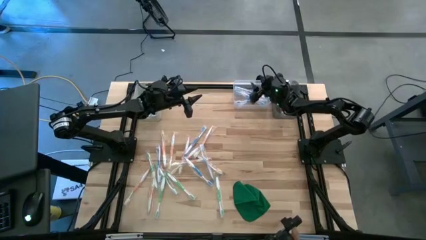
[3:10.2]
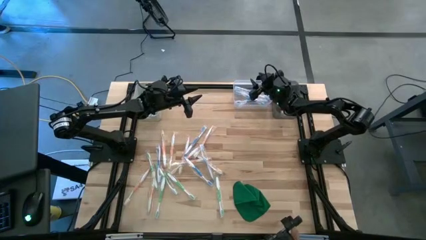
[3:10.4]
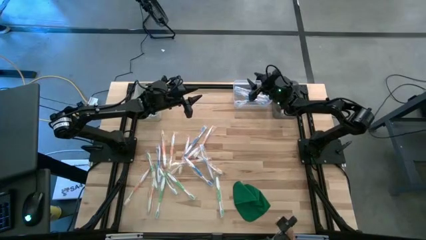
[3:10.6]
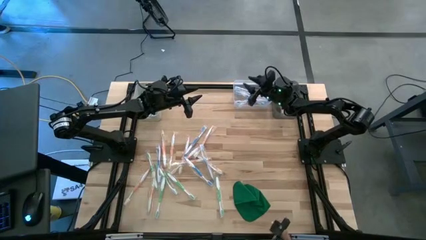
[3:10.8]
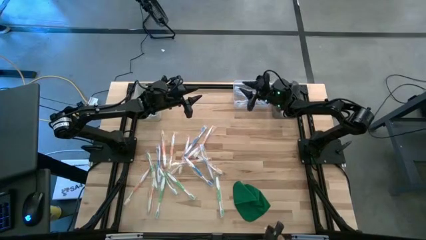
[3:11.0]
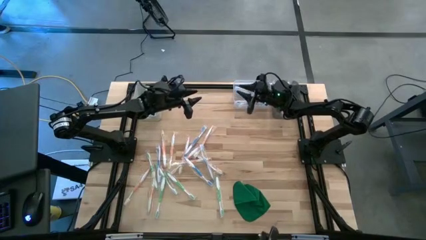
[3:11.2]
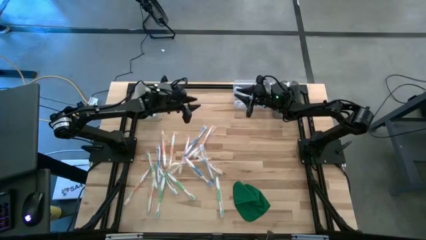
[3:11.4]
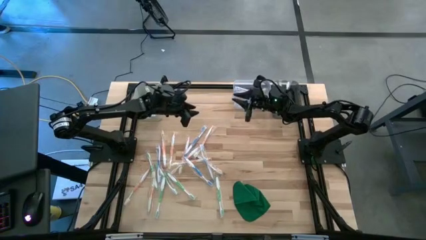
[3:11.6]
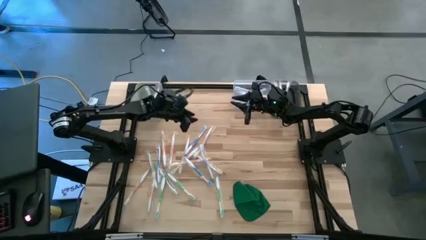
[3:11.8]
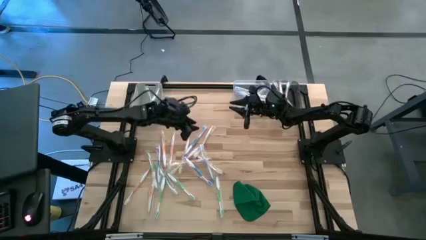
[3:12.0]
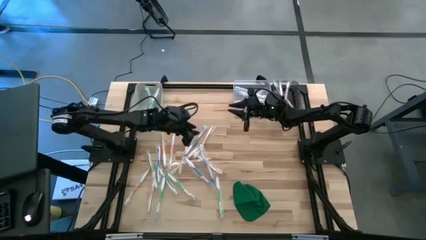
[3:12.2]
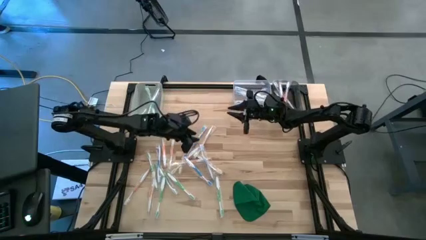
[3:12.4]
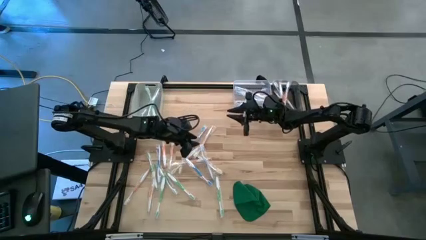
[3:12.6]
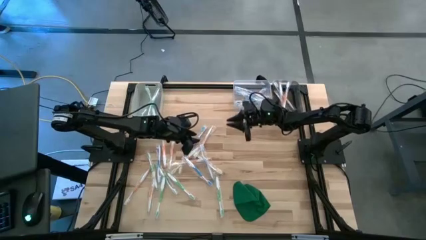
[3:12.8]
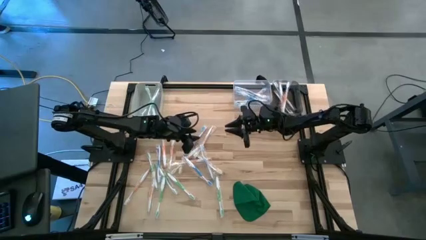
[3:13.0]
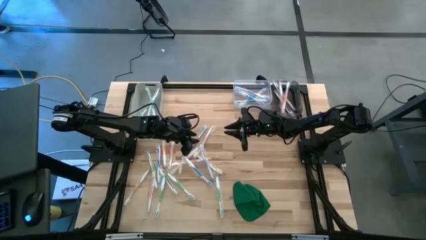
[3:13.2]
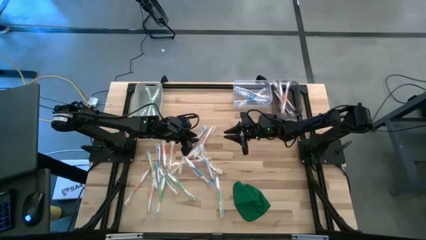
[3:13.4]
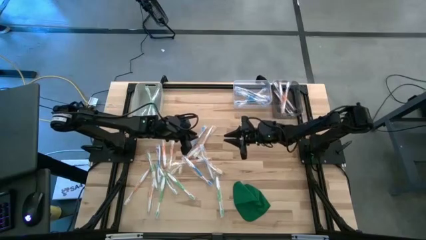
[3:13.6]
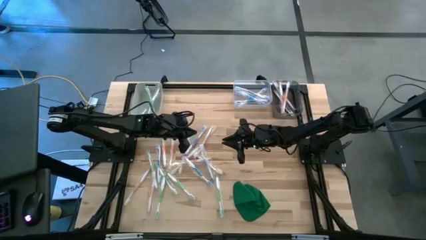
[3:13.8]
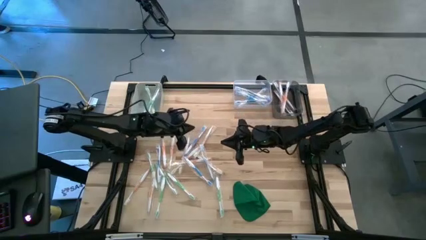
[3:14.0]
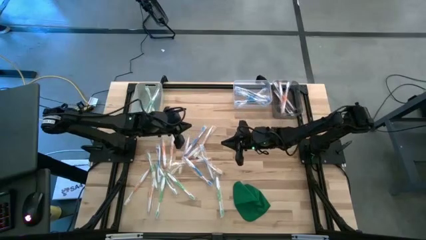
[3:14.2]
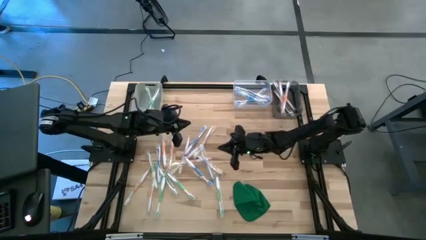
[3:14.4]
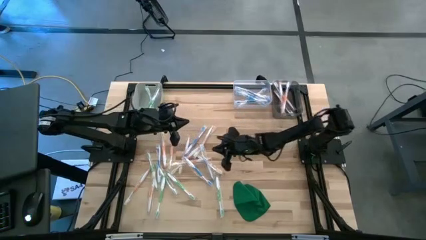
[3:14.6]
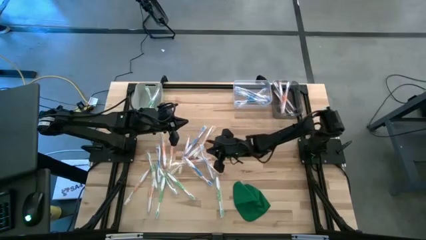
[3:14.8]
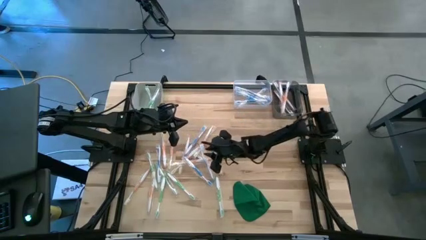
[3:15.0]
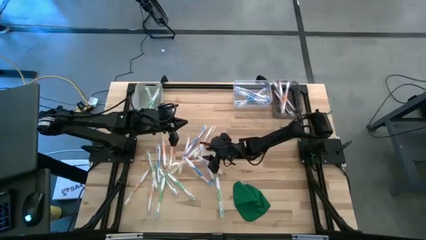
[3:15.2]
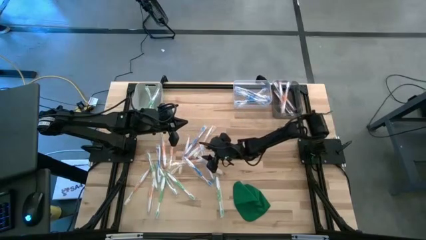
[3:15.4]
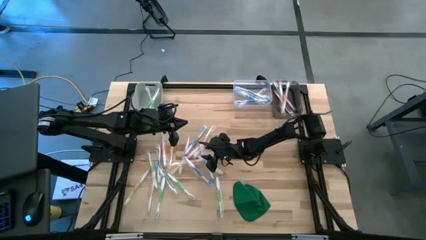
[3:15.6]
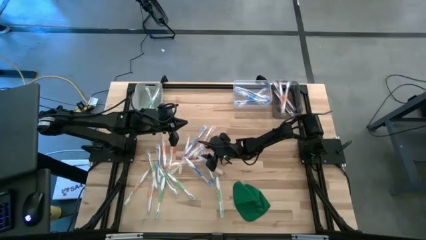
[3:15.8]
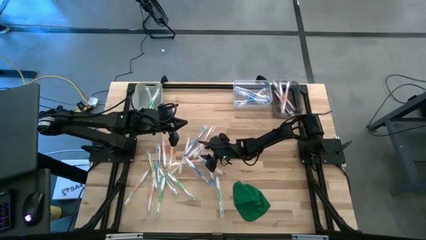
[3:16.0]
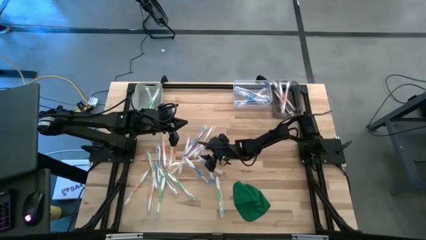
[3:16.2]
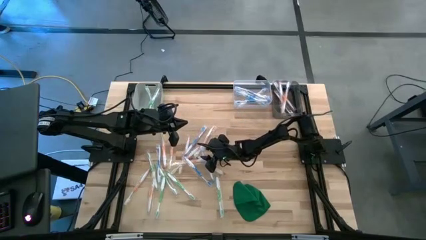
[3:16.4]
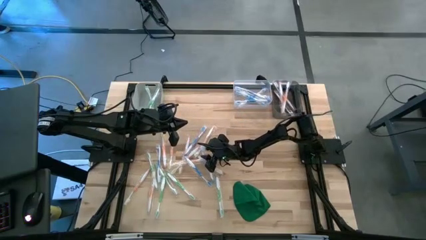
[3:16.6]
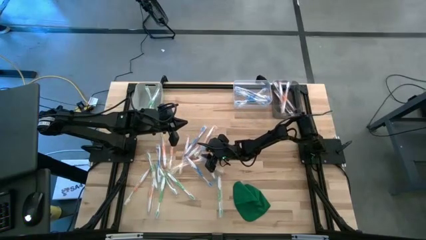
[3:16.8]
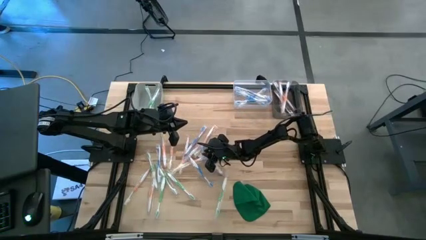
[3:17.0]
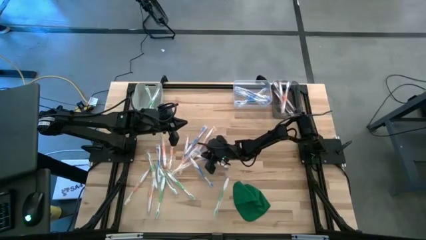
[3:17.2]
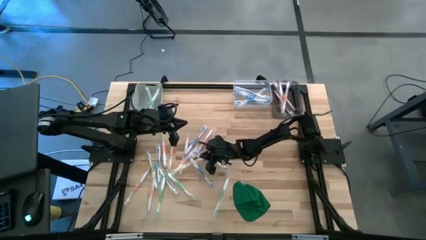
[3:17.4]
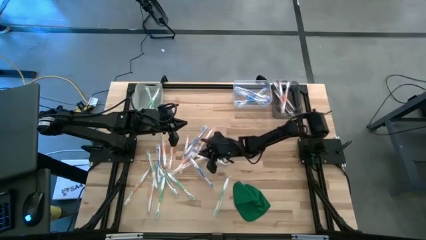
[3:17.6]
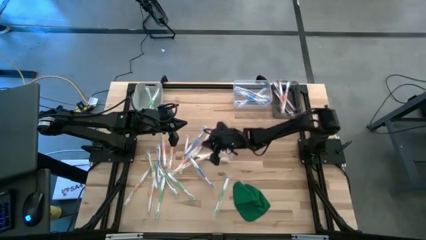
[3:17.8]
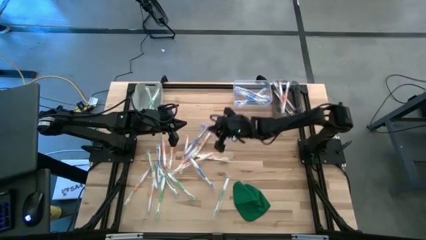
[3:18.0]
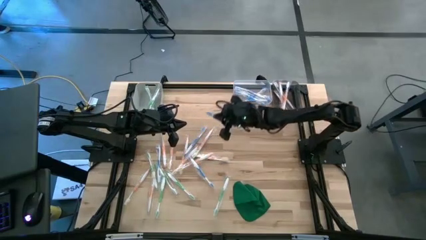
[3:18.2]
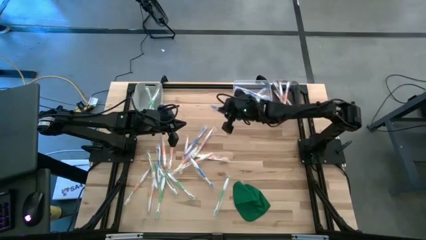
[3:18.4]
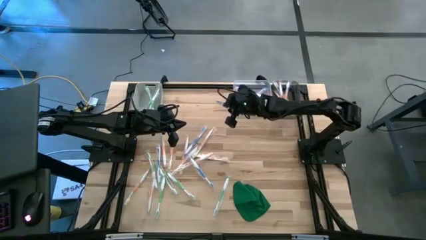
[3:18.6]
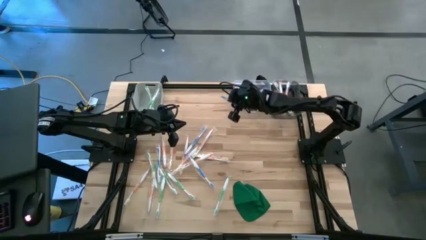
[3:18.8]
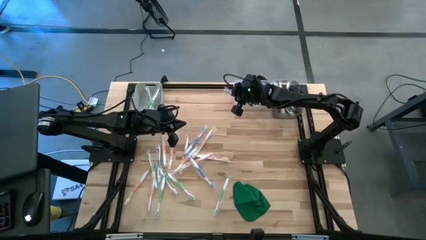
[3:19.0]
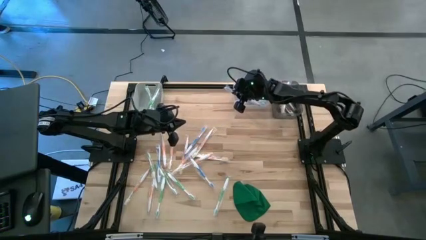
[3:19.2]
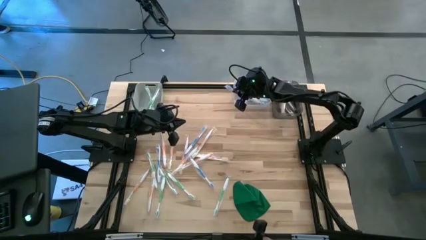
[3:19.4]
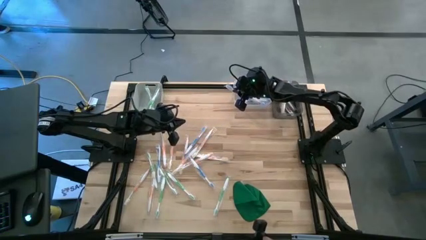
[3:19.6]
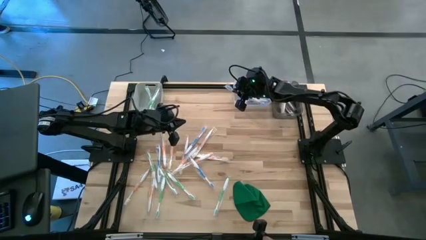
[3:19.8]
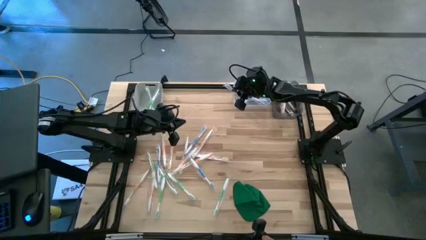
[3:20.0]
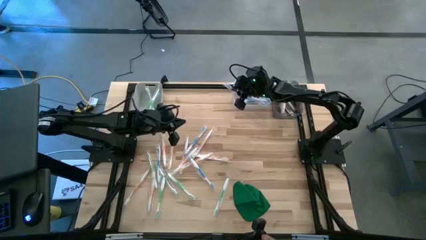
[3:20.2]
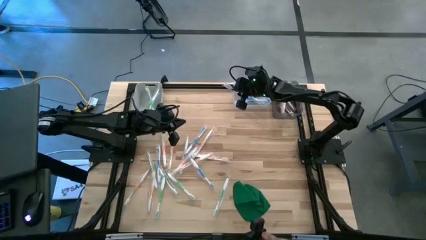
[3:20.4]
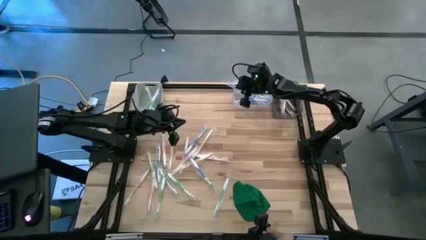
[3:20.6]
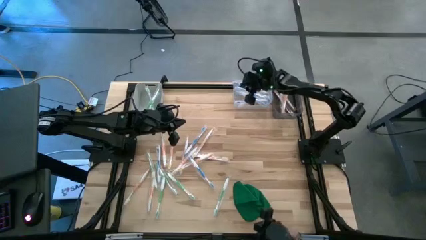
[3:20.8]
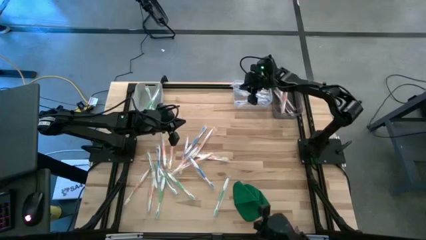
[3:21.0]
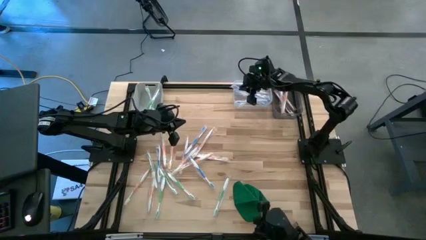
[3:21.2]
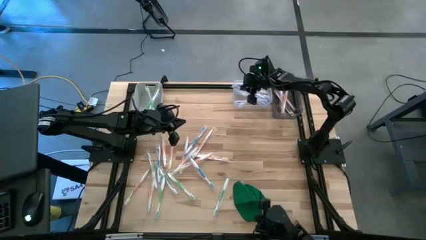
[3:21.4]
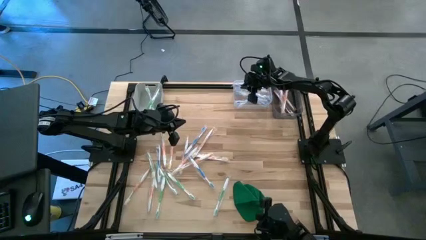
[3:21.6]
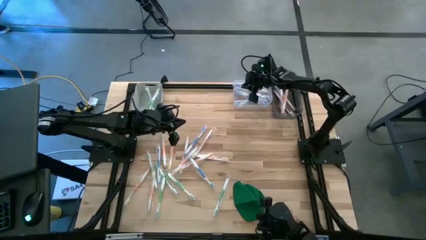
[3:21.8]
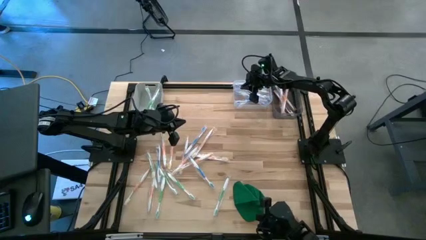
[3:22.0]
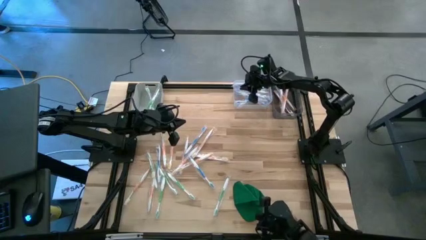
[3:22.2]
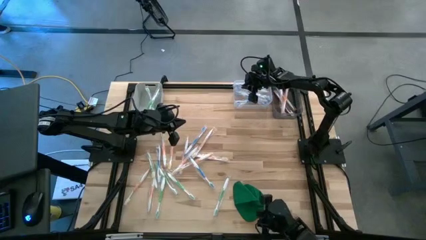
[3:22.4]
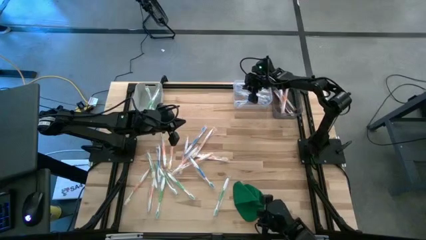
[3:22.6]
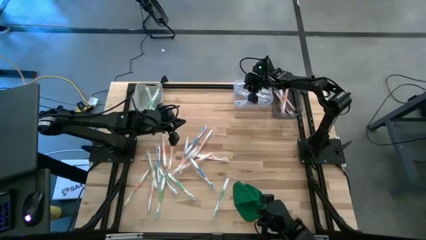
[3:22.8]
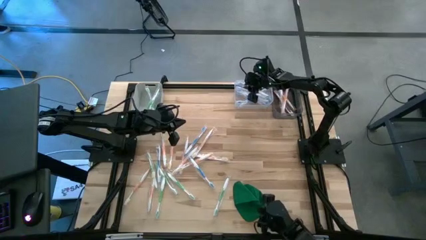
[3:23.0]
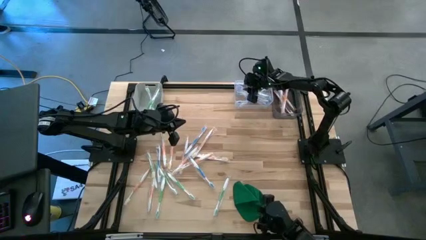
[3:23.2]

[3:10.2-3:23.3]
Task: Pick & Place Toothbrushes
Put the blue toothbrush into the transparent bin
